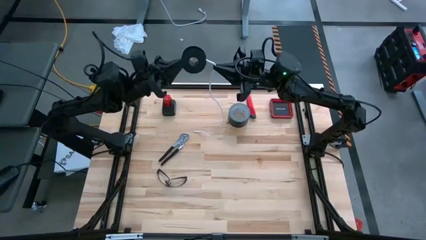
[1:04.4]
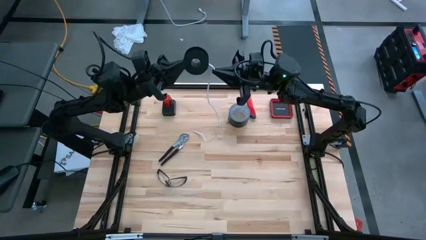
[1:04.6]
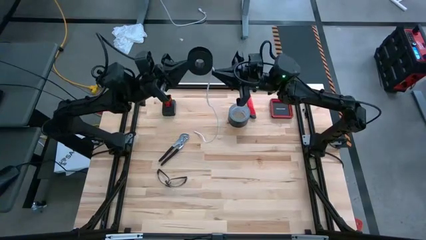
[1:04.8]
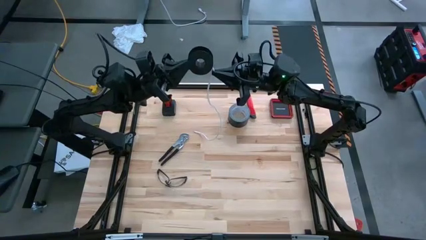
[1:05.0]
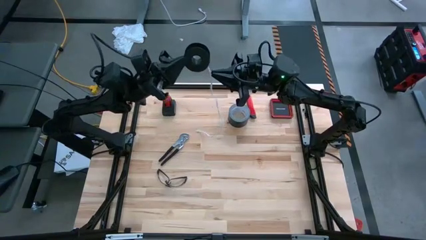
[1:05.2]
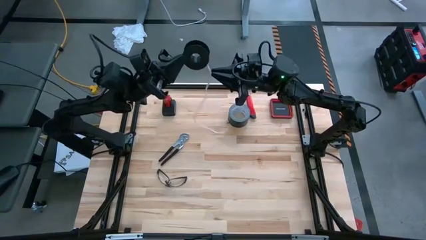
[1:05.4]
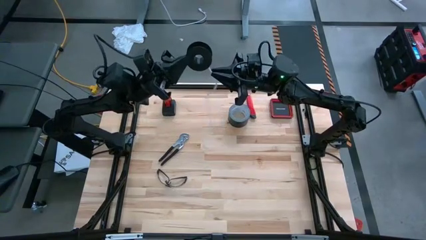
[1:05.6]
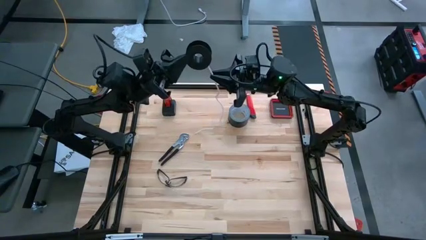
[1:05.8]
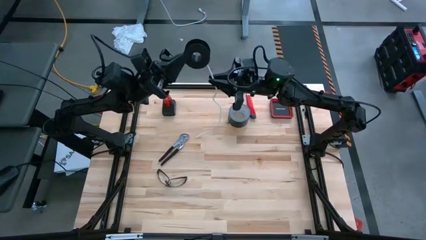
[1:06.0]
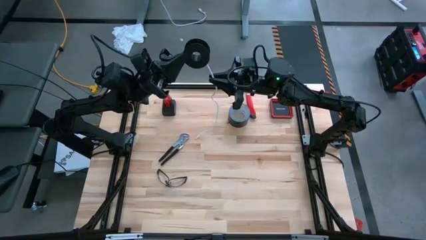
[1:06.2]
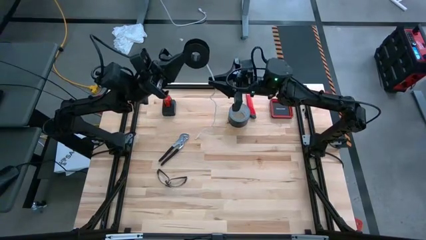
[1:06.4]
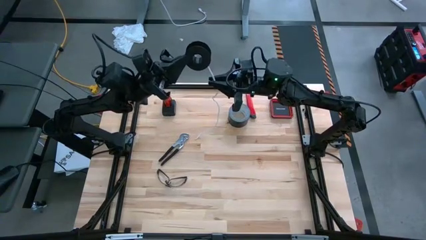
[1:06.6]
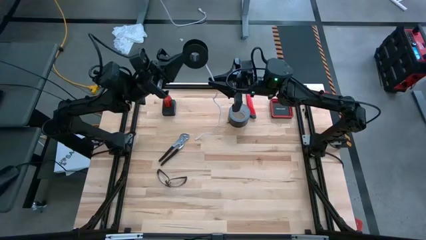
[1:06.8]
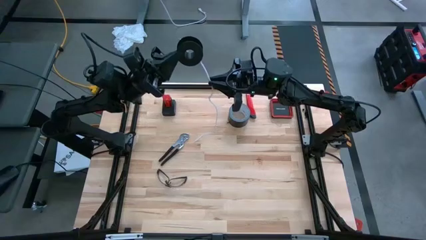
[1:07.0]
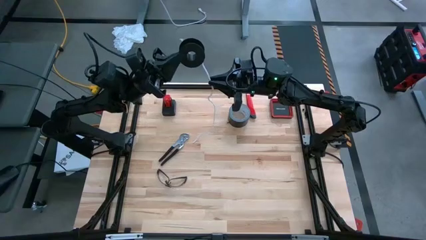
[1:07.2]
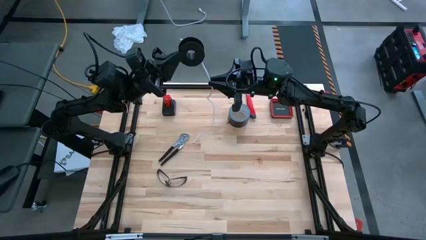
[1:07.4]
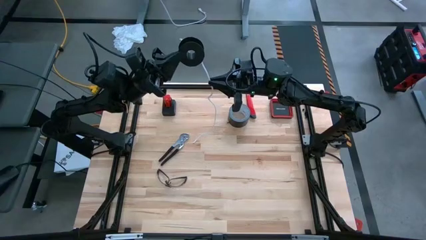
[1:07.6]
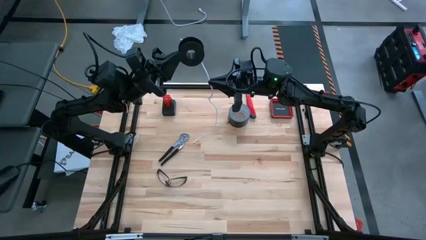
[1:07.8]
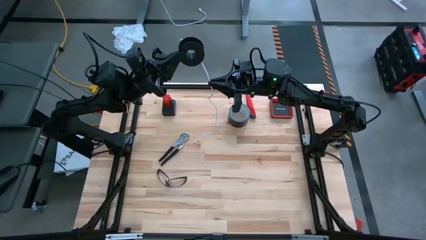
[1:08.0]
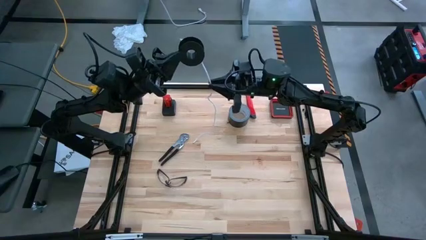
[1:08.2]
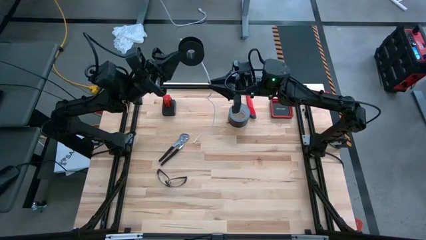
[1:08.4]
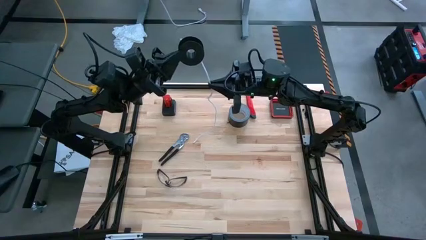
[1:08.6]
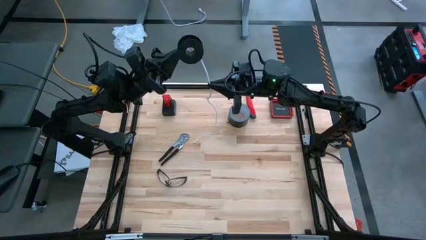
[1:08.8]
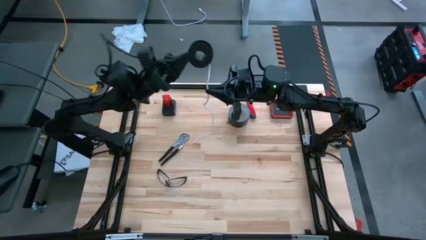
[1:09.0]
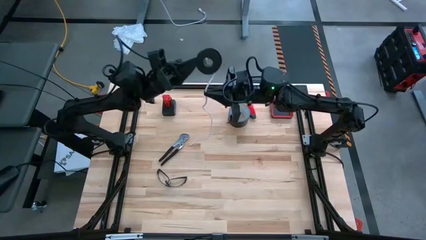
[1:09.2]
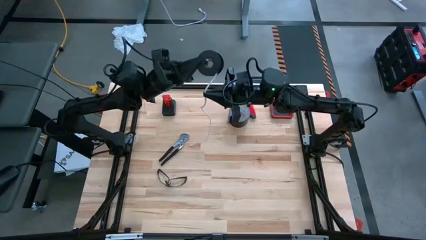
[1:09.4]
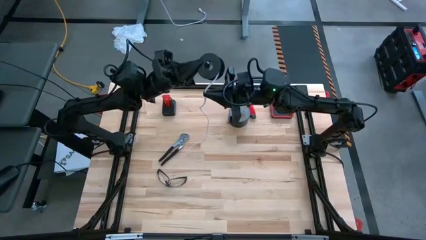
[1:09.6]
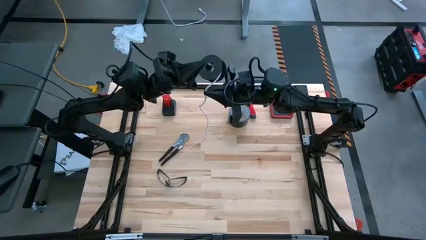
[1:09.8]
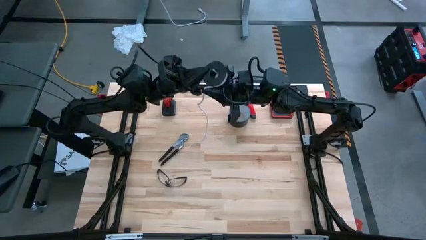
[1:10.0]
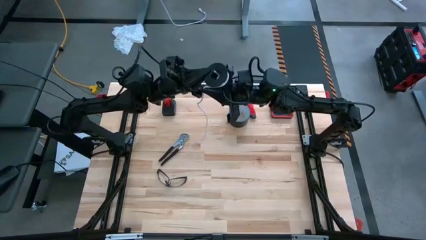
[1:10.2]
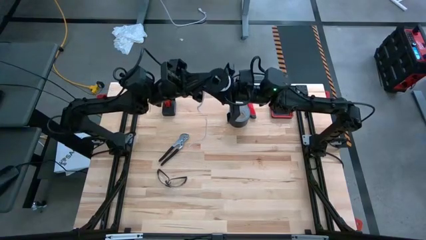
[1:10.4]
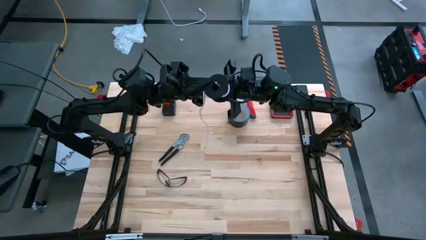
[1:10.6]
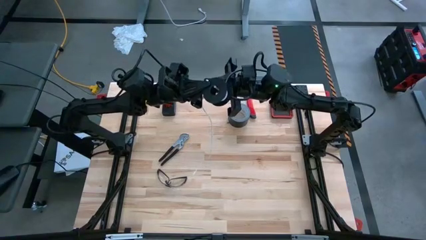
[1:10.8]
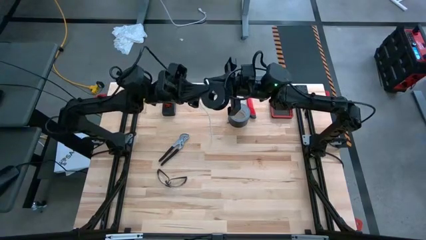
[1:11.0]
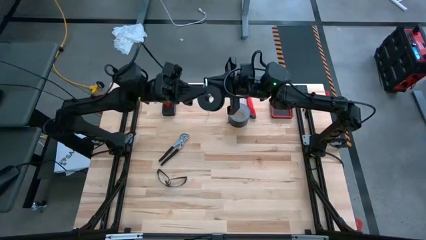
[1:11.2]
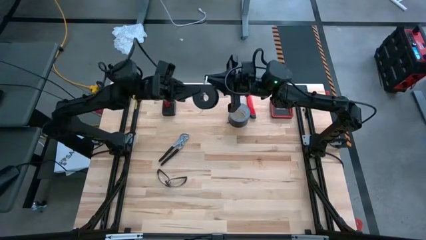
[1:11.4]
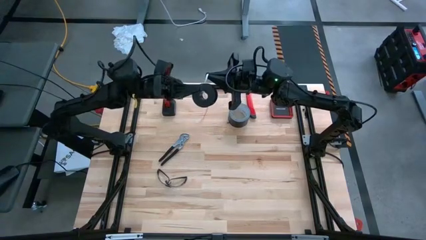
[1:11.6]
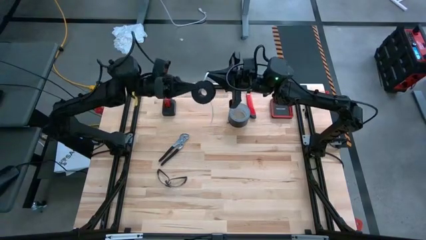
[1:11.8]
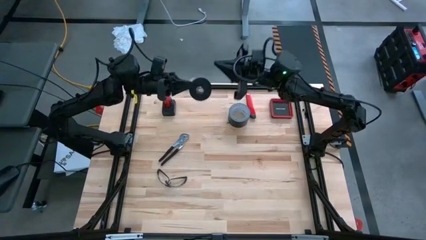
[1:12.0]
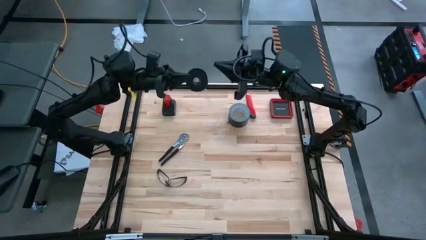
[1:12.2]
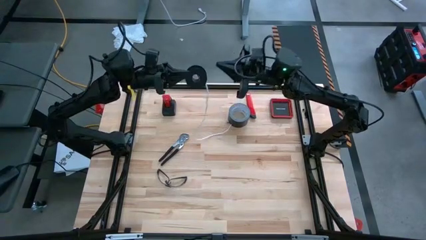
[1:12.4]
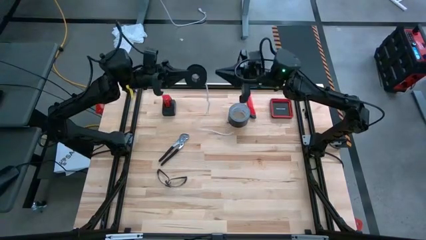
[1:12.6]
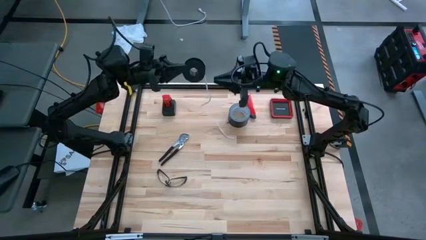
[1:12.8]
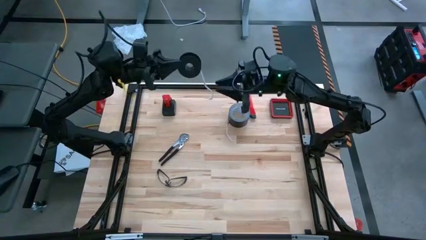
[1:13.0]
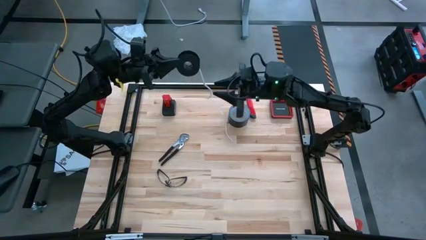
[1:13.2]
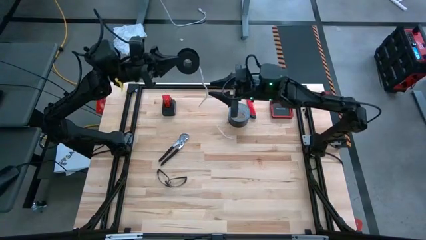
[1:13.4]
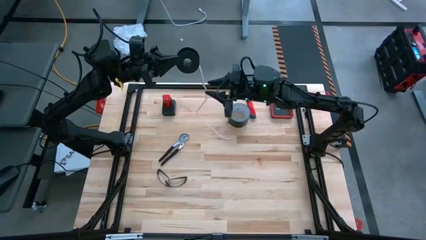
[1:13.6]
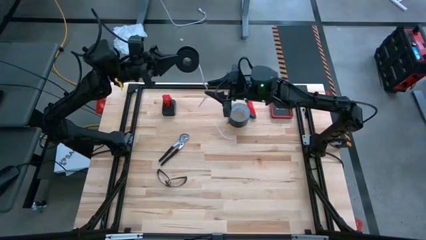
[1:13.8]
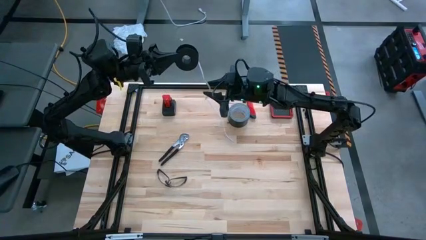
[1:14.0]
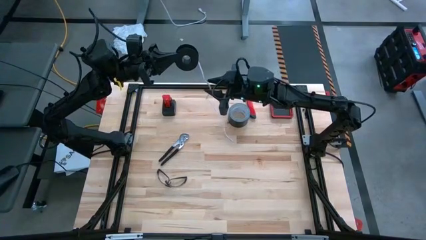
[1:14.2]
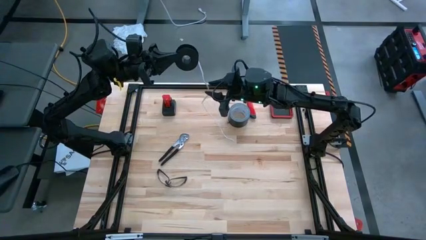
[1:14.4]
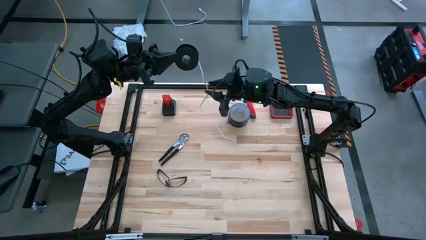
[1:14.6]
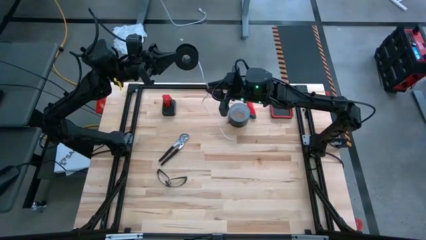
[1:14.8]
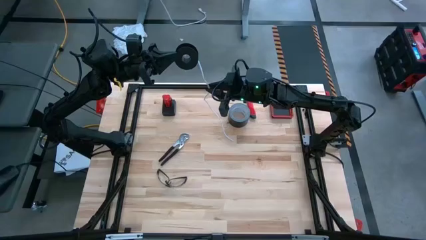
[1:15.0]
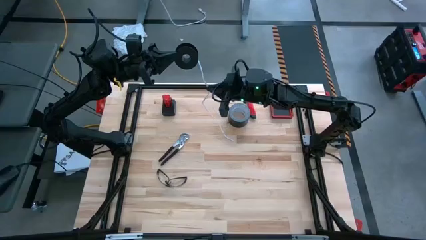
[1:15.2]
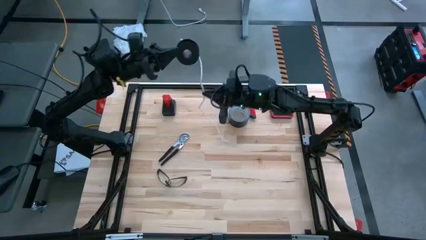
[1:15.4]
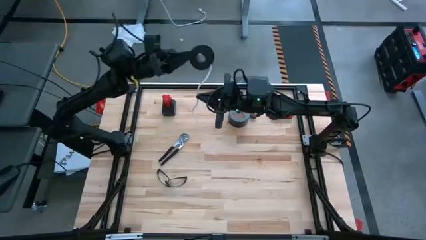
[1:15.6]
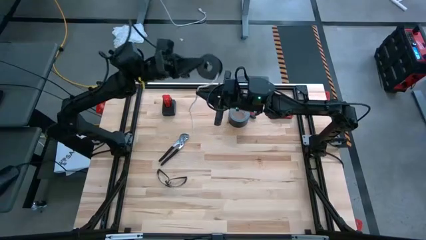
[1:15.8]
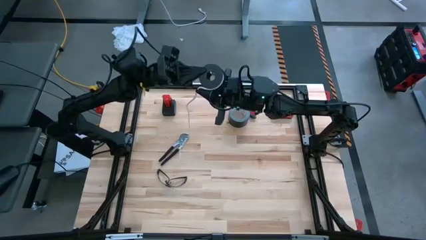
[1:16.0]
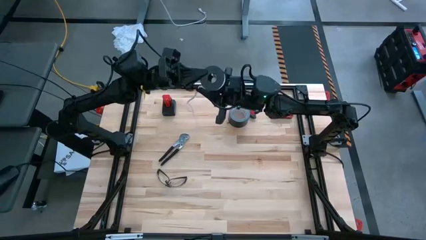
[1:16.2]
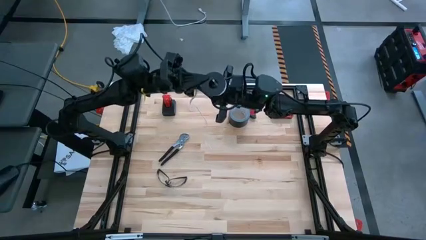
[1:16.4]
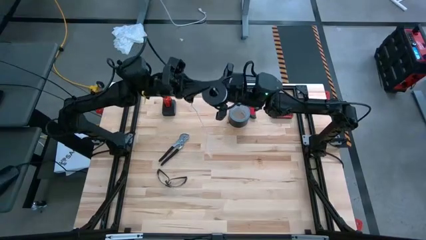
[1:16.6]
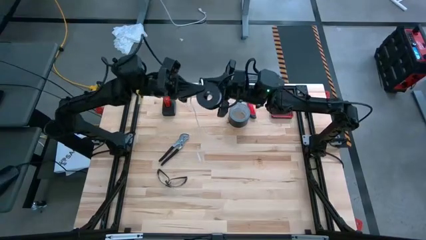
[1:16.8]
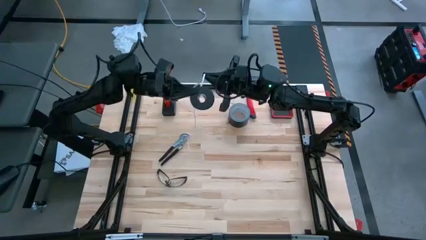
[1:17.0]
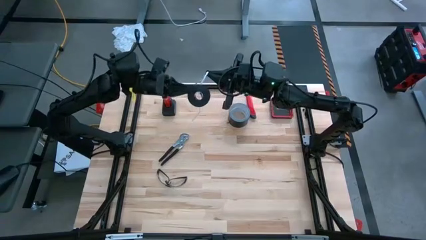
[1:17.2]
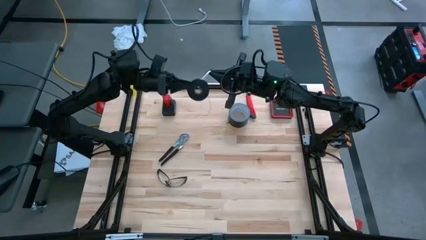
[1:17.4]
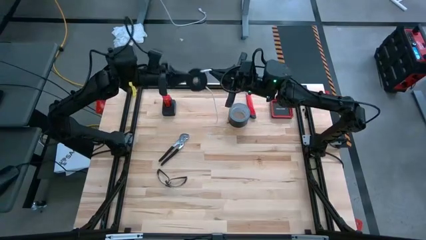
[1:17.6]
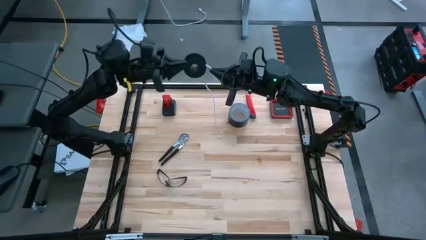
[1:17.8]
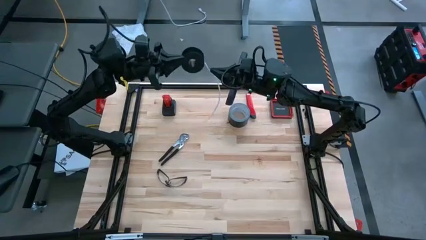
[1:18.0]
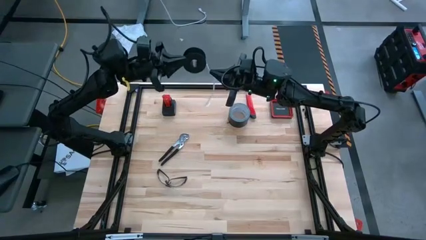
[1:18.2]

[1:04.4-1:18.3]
Task: Coil cords
Coil the white wire onto the black spool

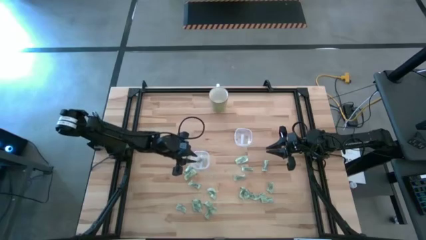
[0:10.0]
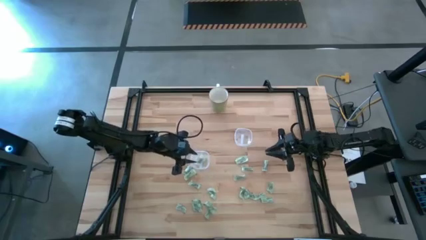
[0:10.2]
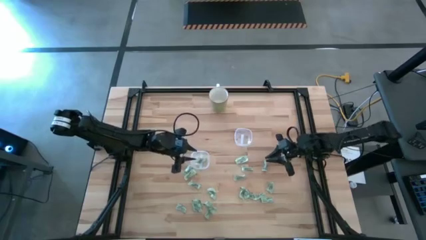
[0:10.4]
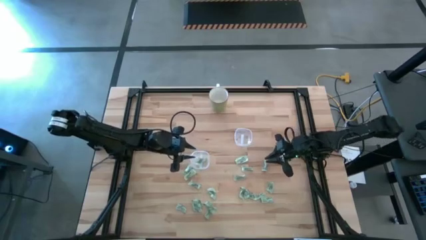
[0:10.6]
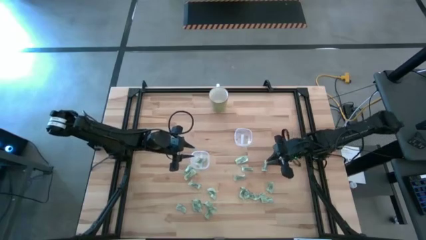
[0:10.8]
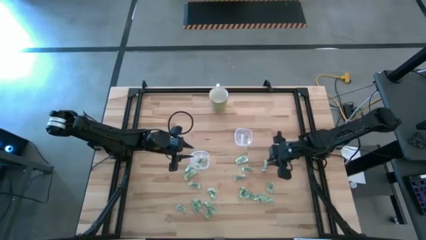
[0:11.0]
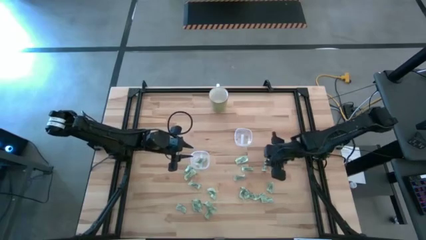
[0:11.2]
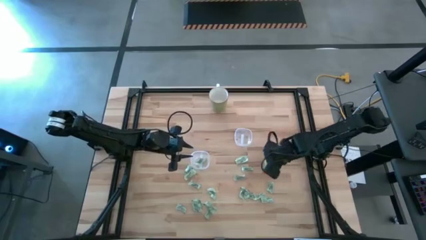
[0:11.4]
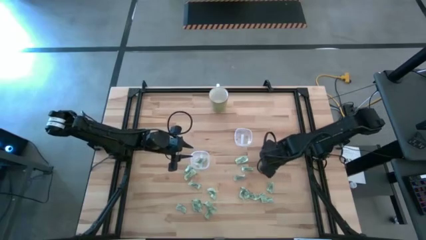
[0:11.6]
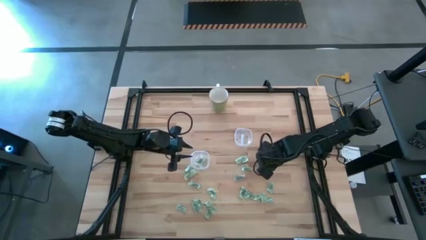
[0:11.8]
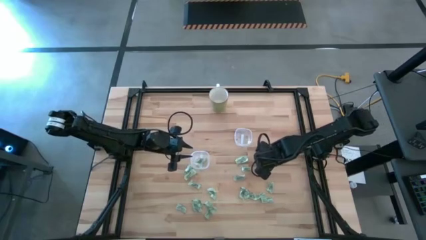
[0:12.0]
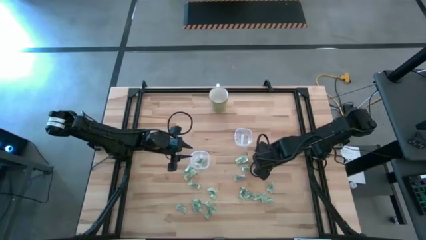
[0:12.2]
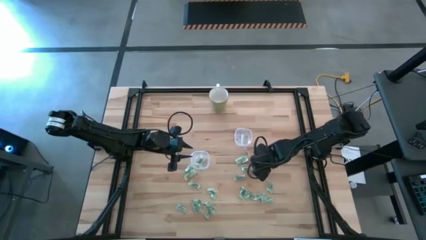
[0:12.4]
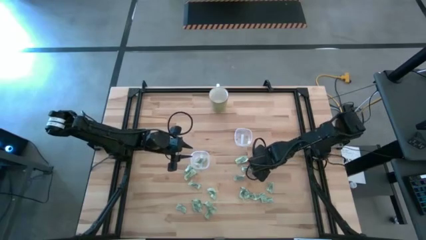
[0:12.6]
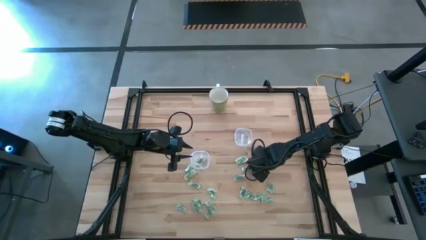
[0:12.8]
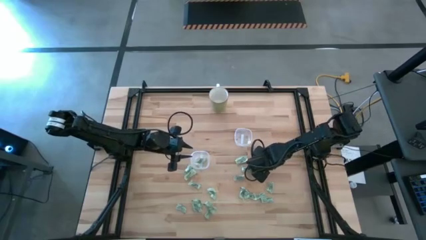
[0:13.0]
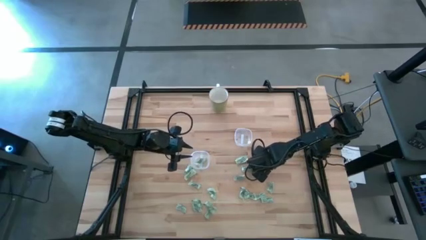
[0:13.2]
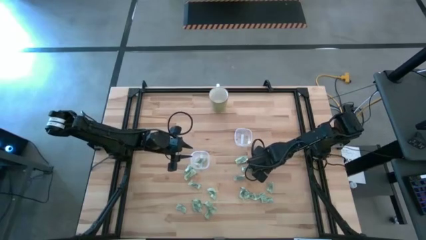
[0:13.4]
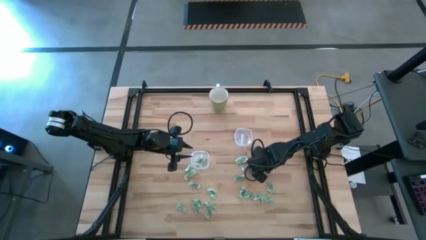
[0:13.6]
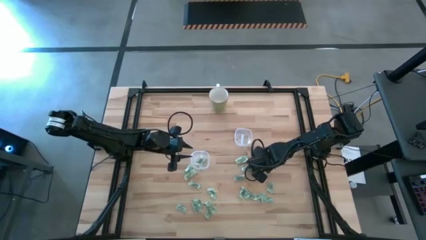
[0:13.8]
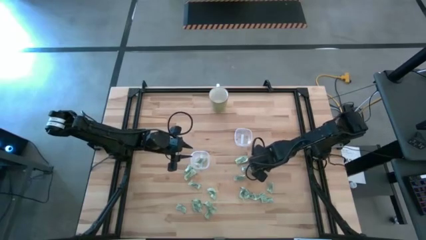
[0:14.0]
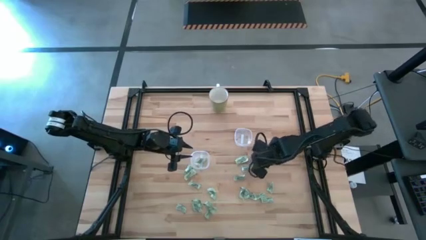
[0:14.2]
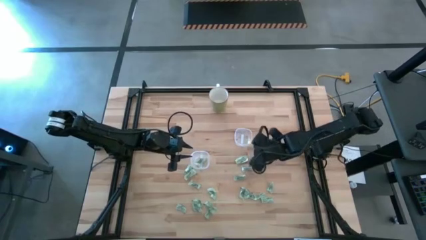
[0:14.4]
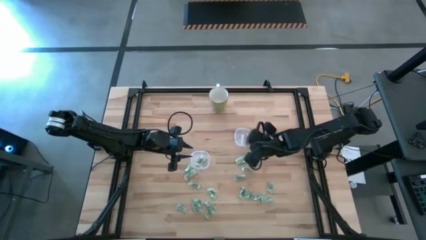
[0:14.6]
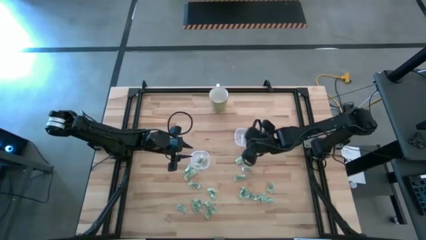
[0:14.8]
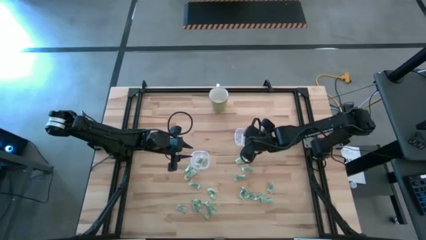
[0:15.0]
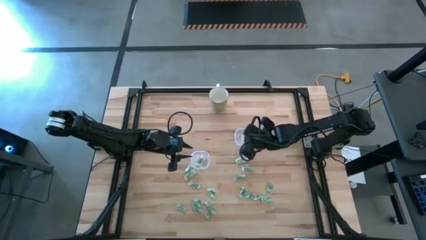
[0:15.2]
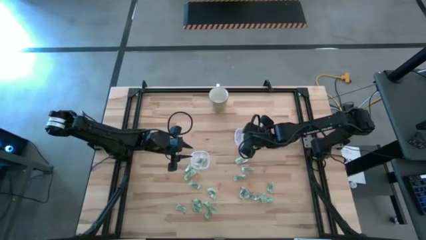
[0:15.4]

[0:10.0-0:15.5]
Task: Pick and place Stevia / Truvia into bins
Put the green stevia packet into the right transparent container
